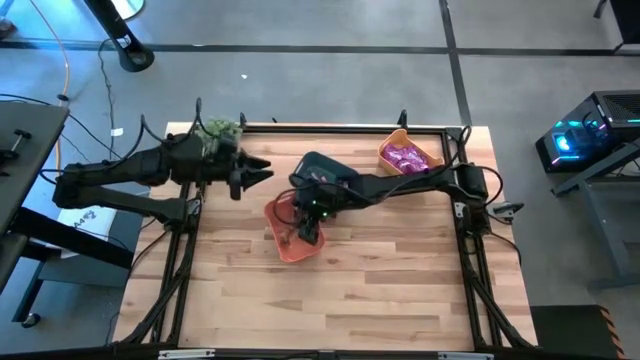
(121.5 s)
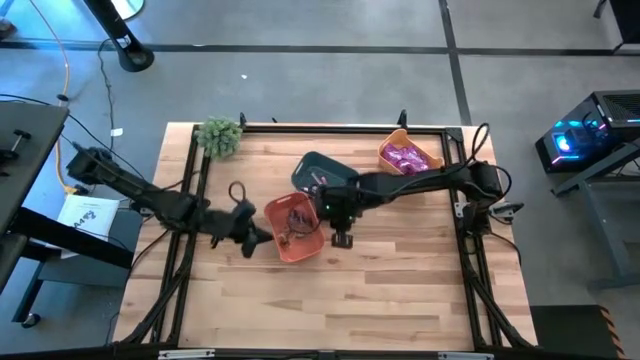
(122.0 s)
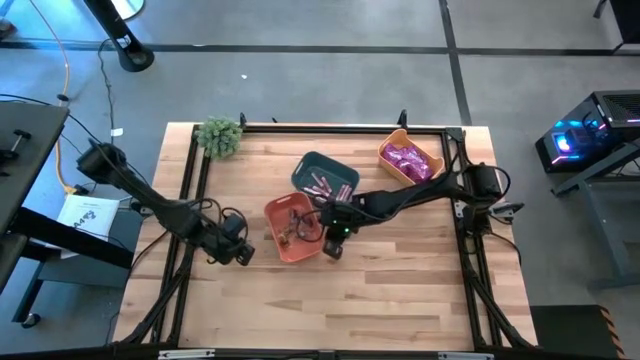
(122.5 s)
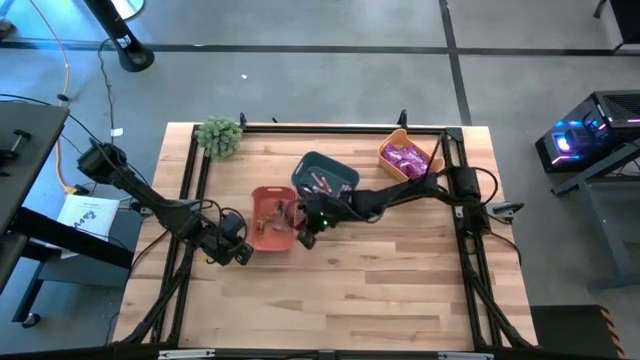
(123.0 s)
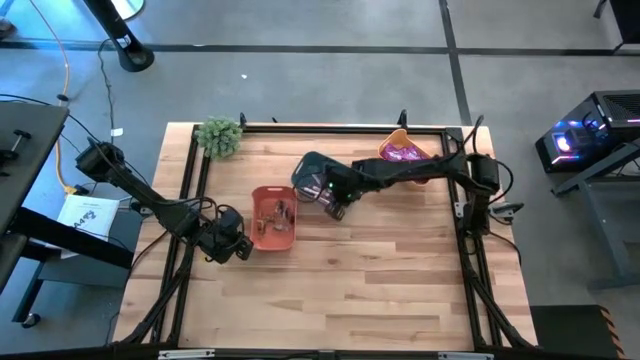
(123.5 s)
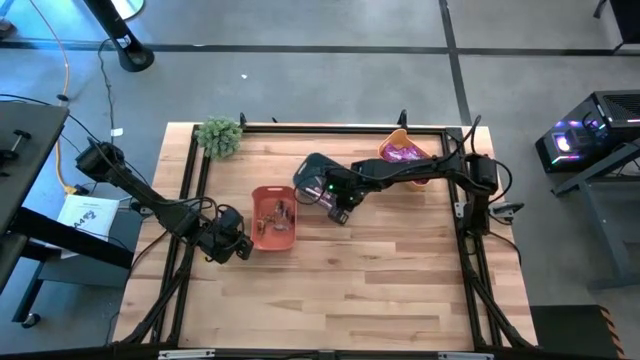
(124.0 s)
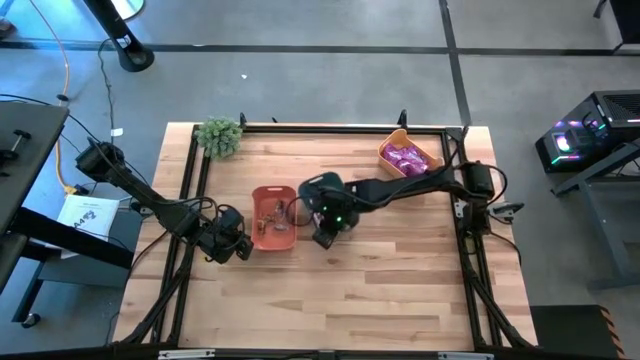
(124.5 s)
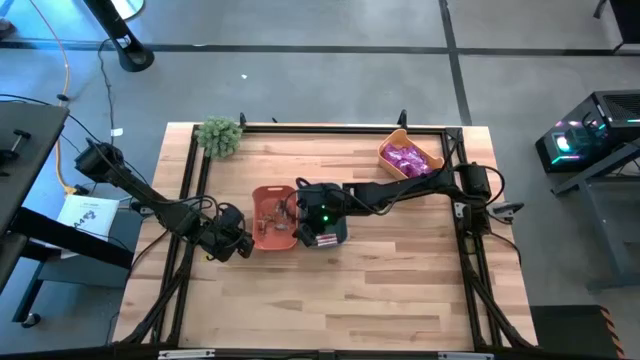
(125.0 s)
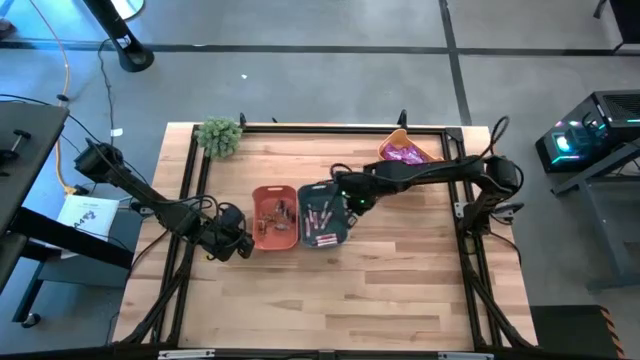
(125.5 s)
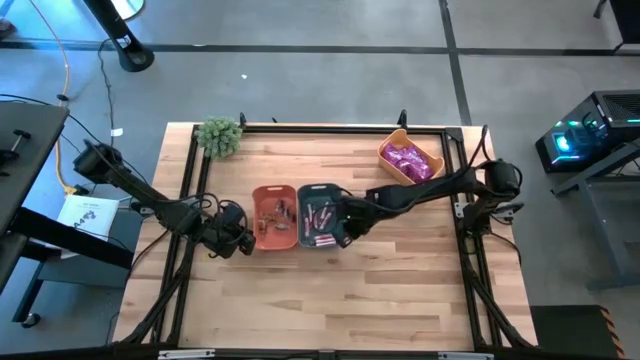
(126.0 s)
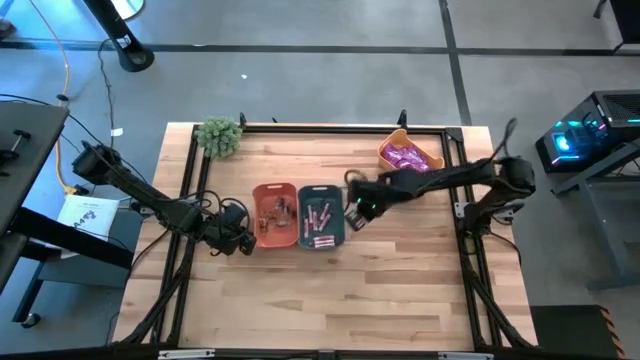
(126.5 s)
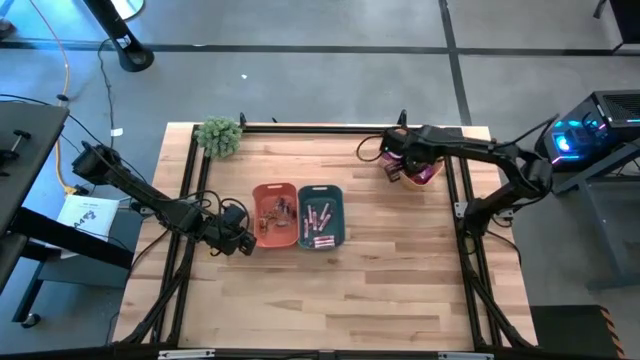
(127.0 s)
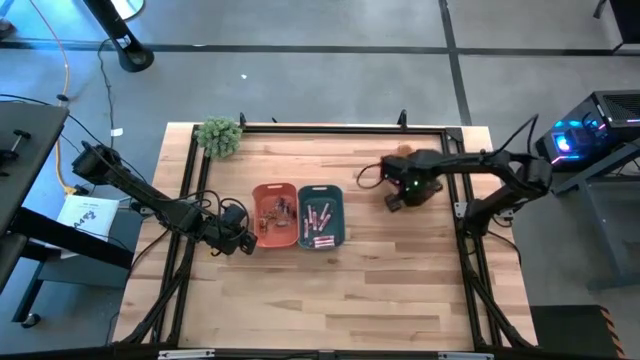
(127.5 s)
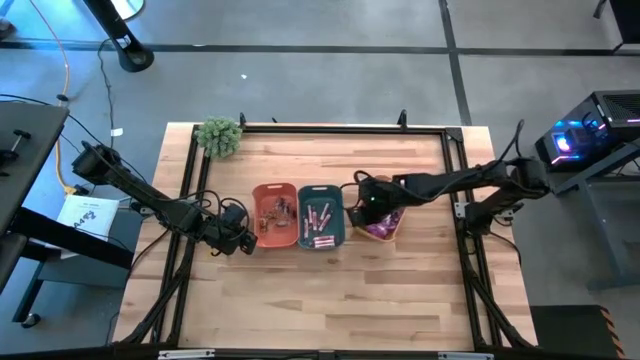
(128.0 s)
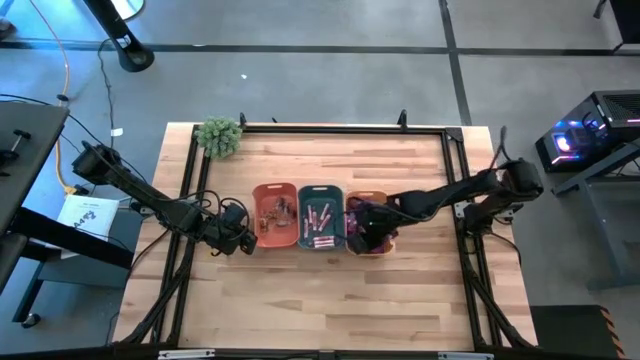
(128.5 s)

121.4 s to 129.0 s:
Task: Sort candy
Adjust the bins on the table

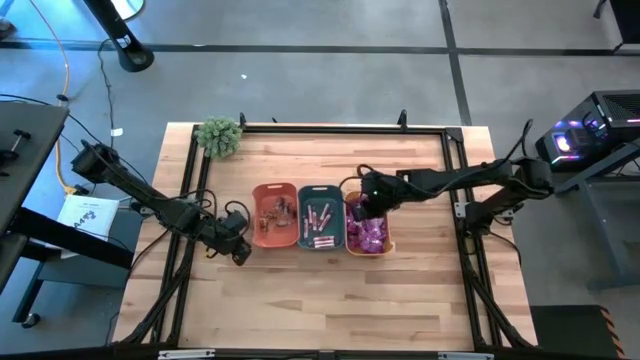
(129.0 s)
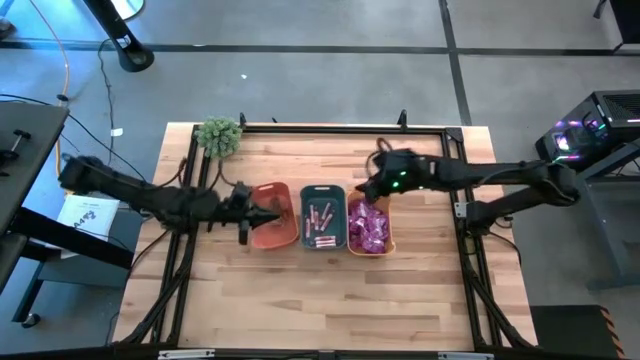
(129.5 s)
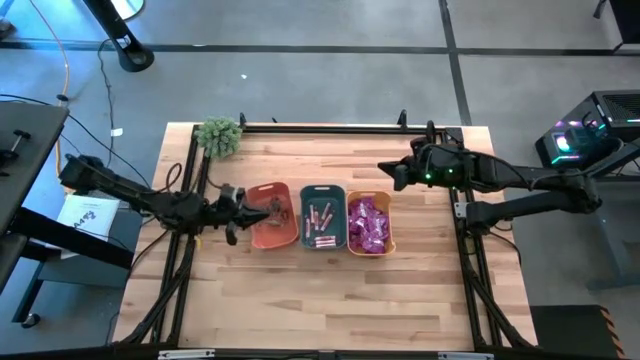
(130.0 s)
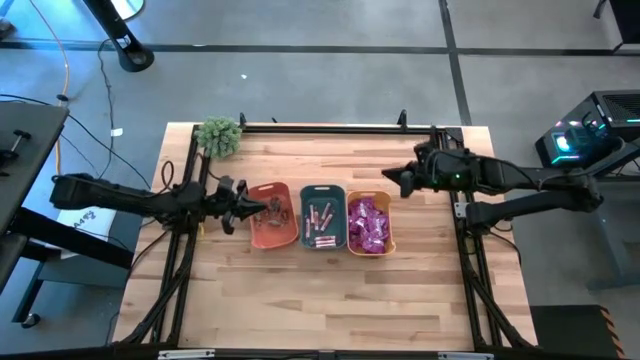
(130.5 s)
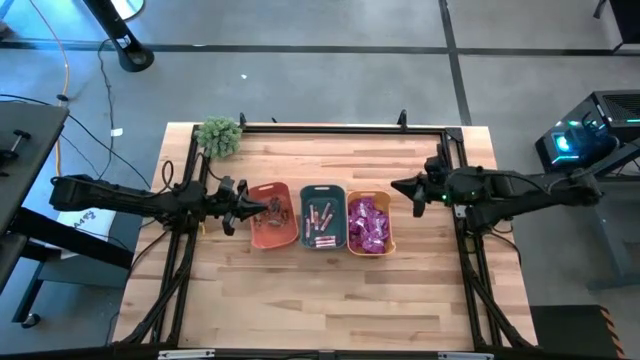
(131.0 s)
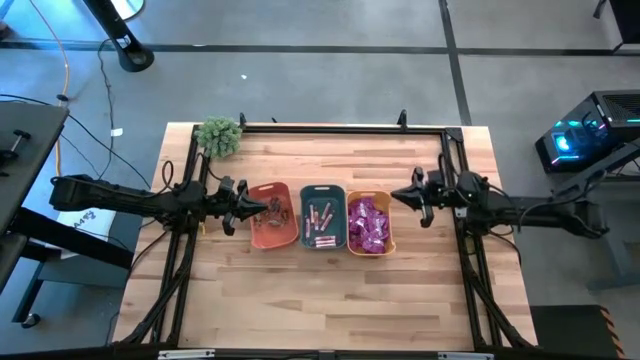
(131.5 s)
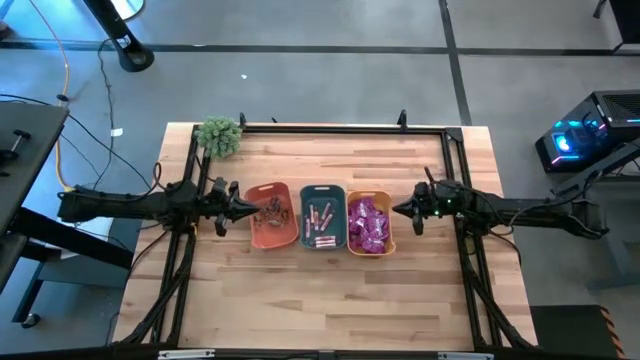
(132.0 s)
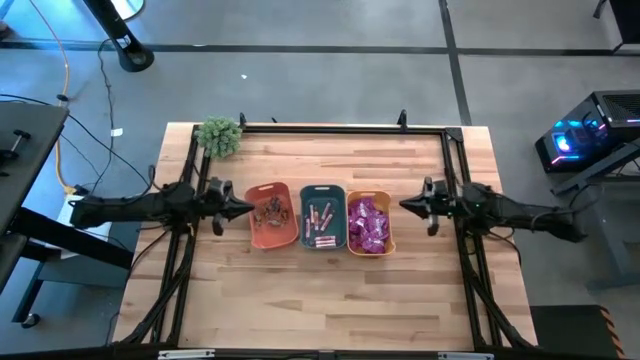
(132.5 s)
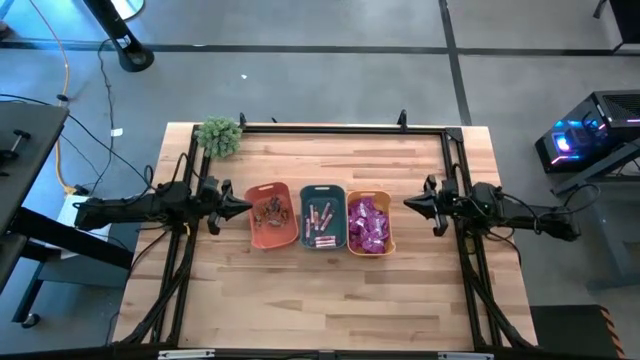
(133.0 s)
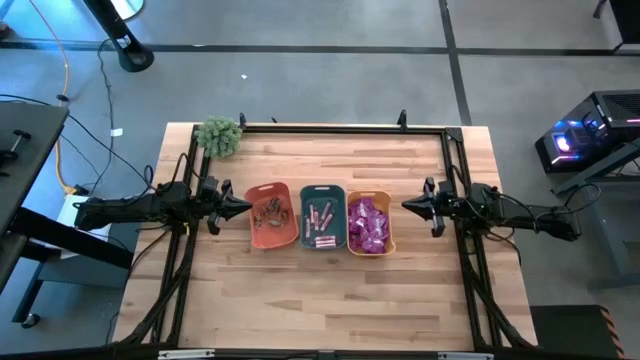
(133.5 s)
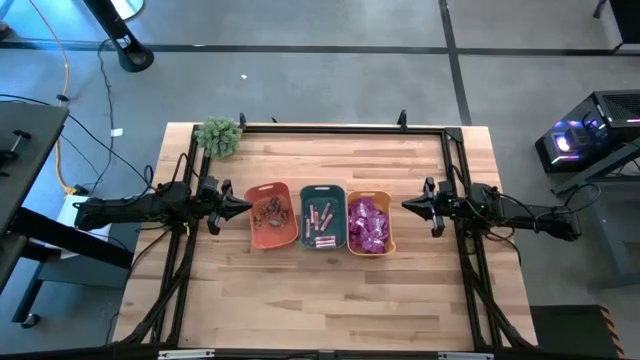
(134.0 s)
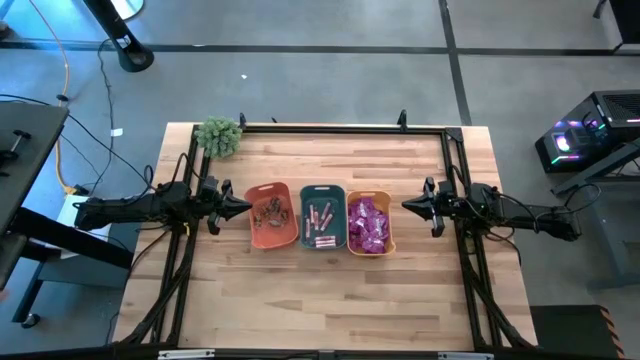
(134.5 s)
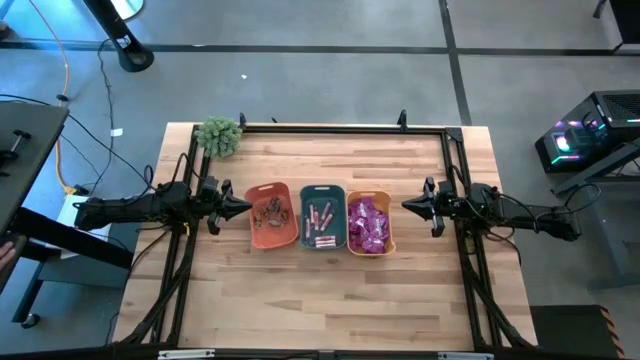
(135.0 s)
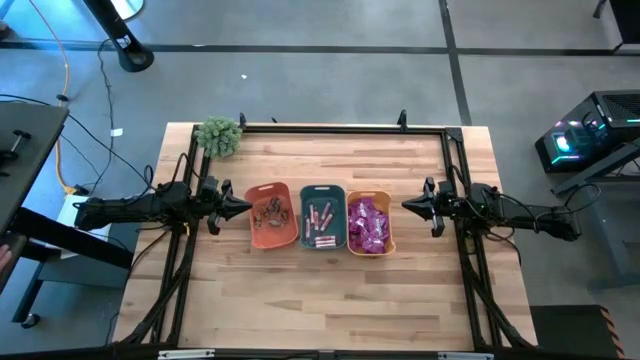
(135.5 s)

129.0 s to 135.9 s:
Return to Home Position

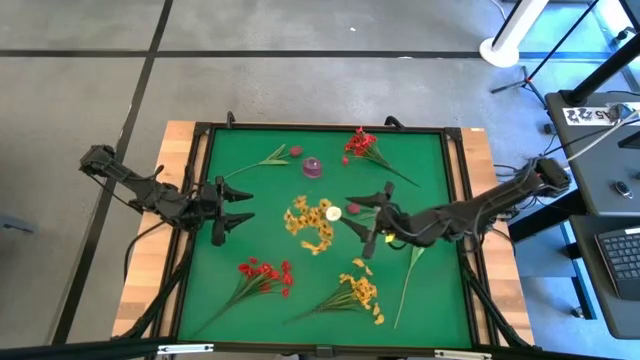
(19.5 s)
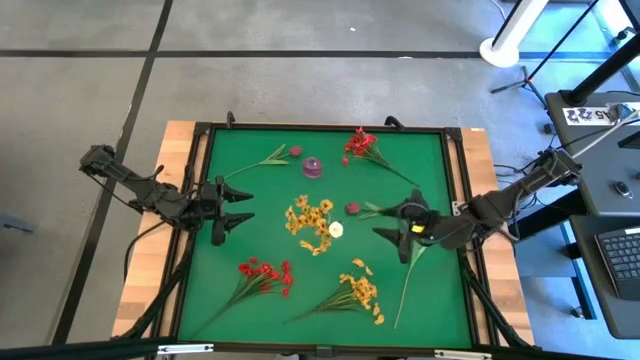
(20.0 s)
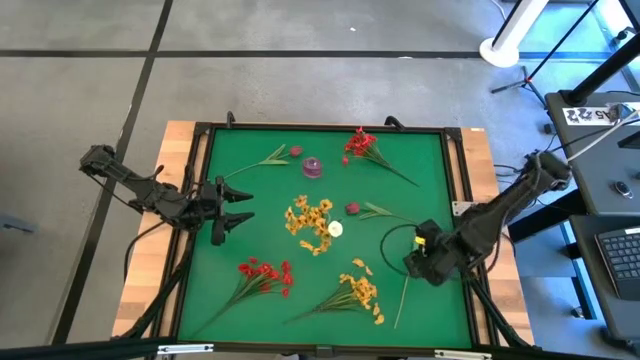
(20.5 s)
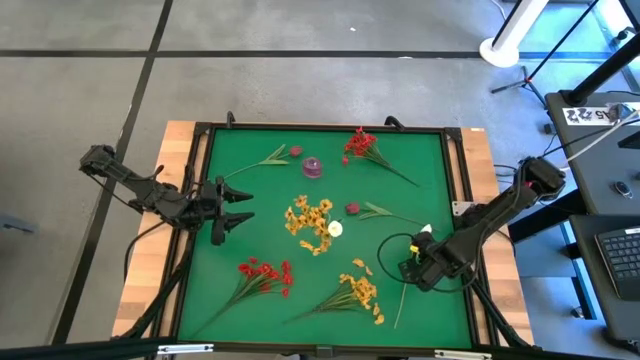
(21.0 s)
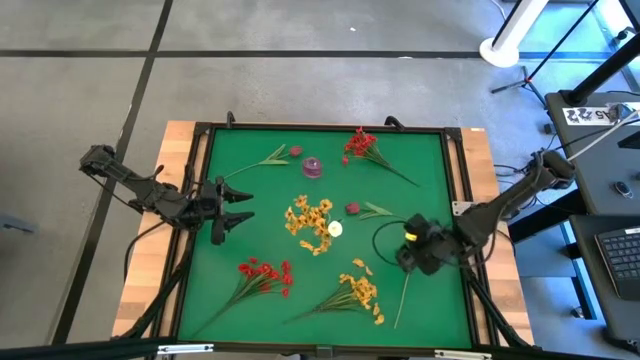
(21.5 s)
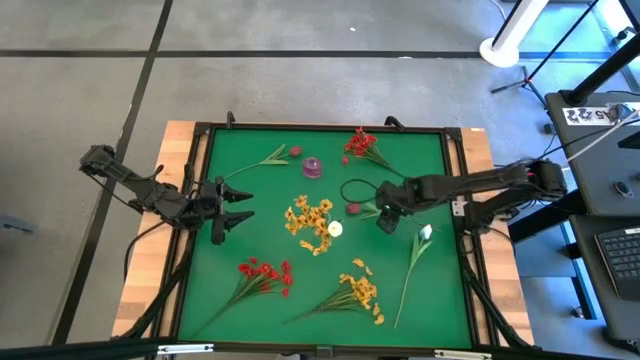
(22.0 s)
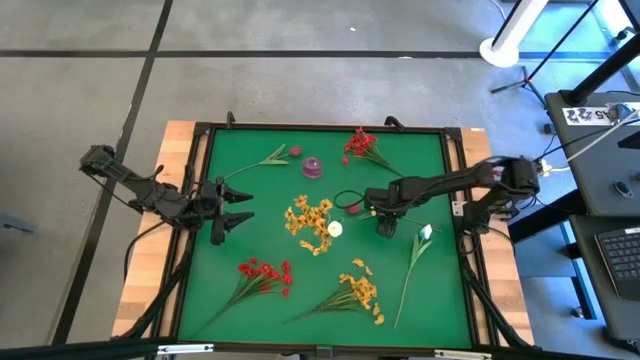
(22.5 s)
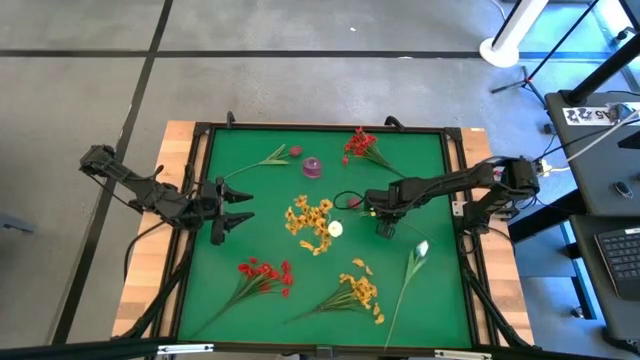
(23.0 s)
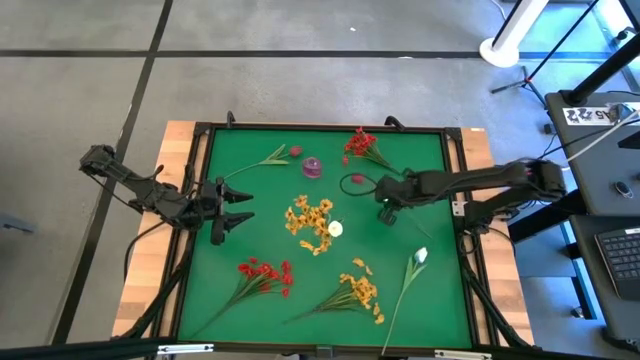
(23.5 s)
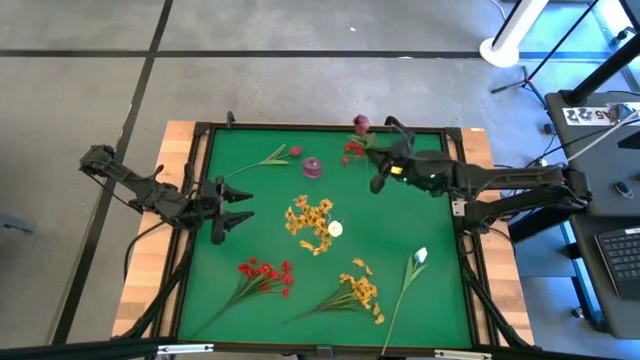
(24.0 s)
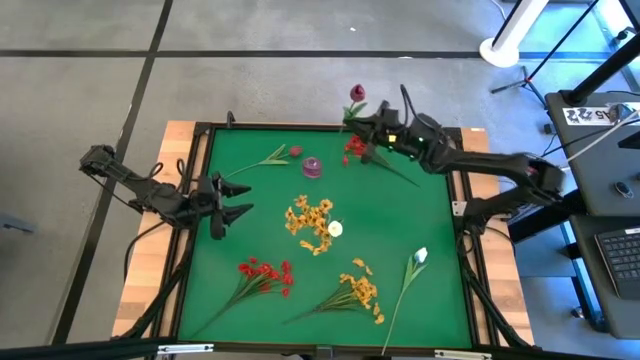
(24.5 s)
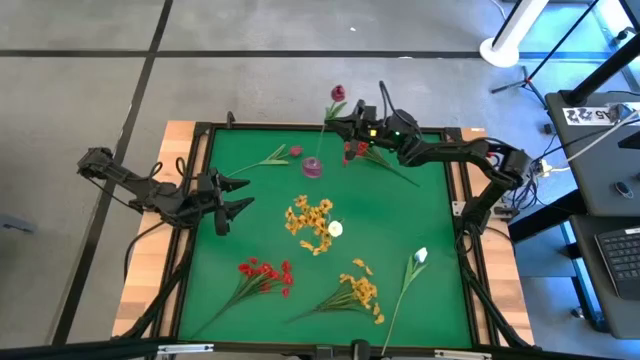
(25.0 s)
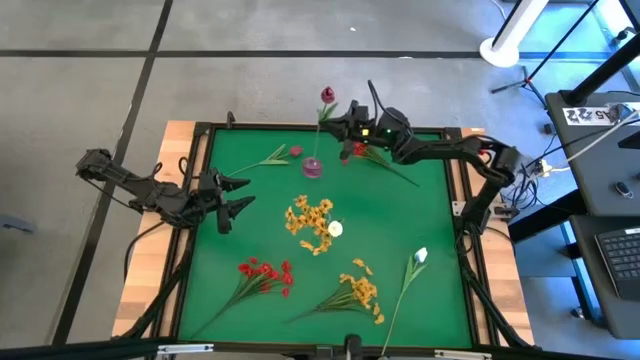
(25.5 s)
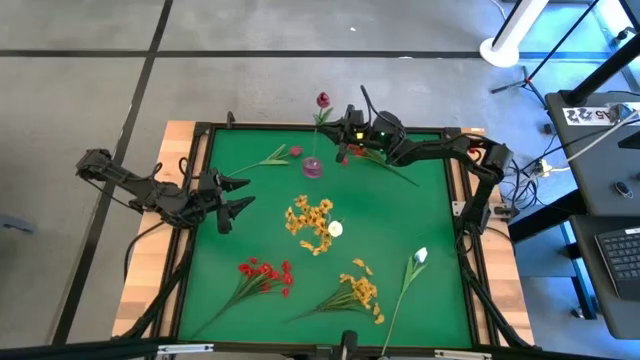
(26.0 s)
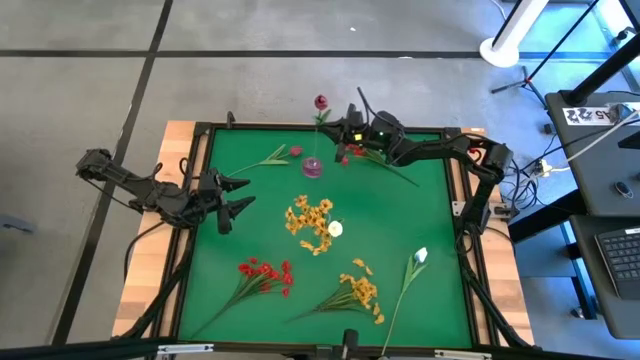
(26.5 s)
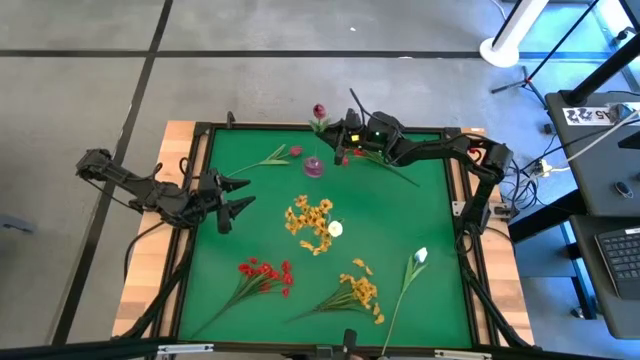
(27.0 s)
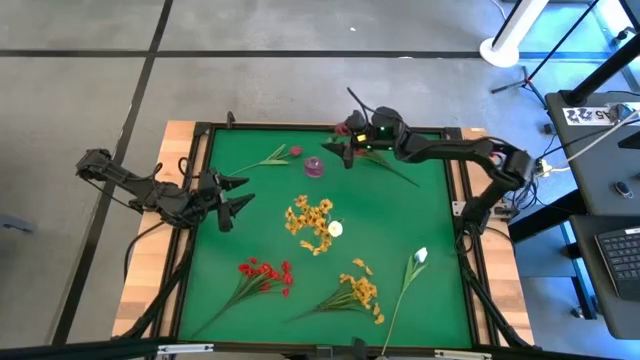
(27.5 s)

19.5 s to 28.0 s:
Task: Sort flowers into vase by color
Put the bottom dark red flower into the purple vase
